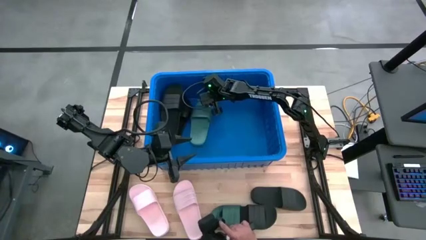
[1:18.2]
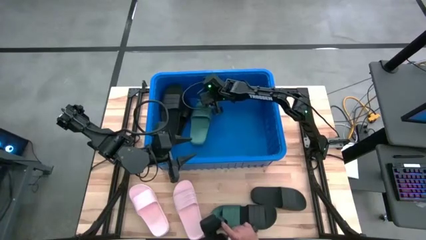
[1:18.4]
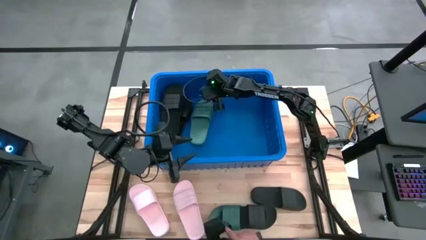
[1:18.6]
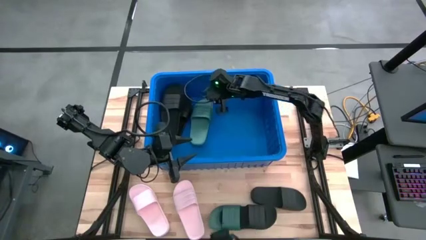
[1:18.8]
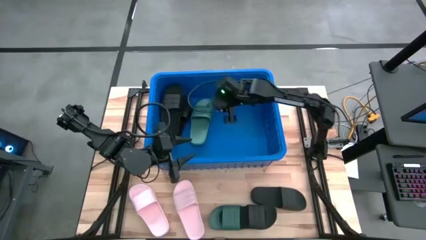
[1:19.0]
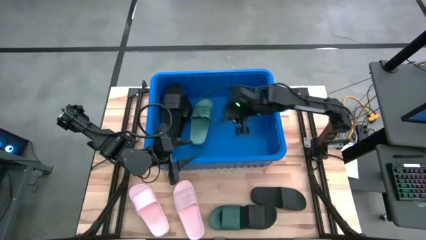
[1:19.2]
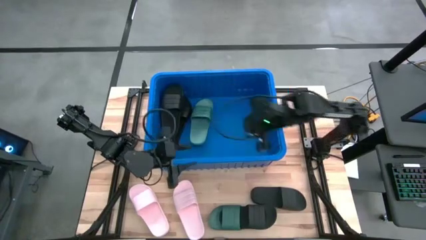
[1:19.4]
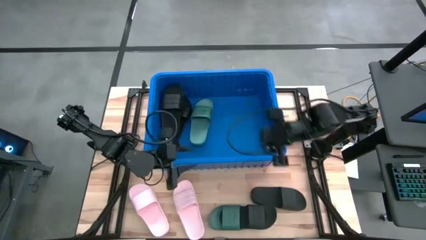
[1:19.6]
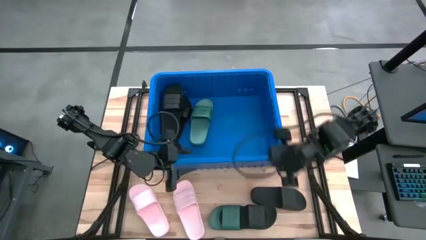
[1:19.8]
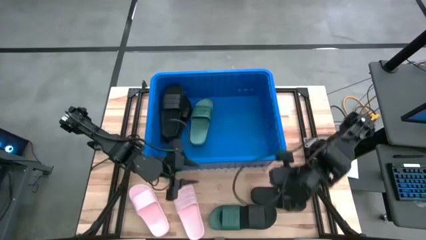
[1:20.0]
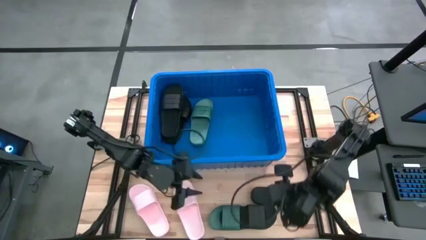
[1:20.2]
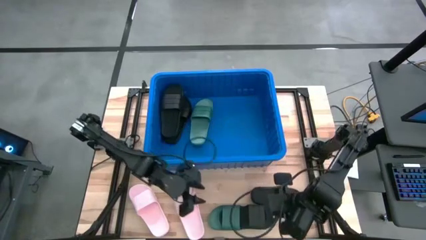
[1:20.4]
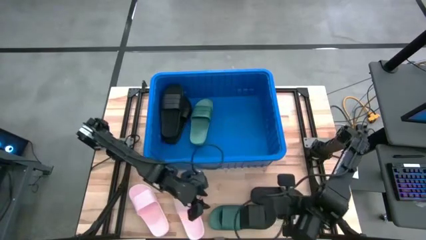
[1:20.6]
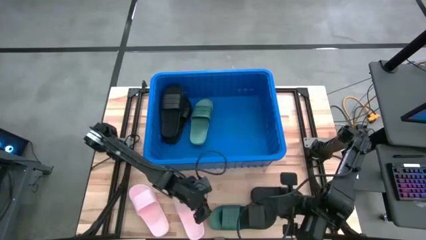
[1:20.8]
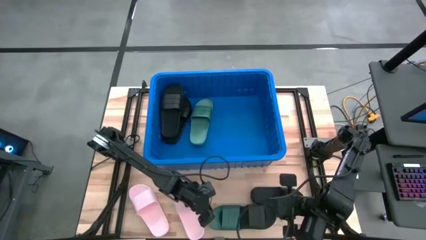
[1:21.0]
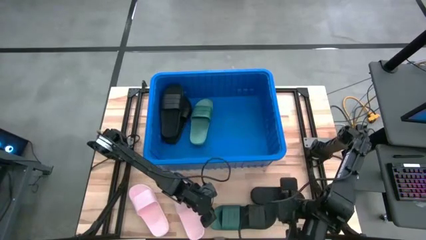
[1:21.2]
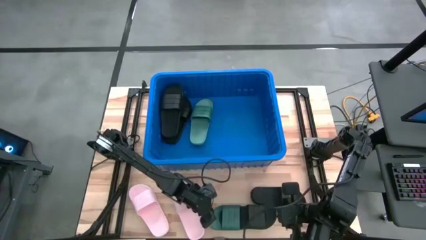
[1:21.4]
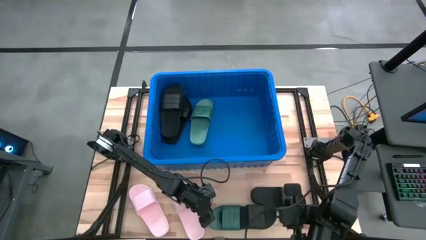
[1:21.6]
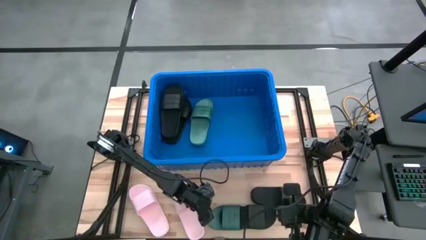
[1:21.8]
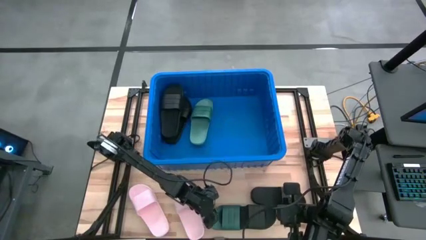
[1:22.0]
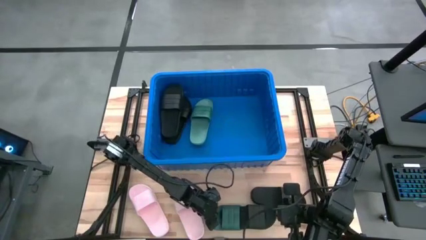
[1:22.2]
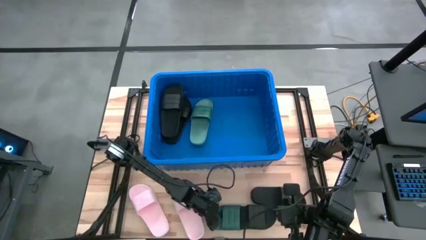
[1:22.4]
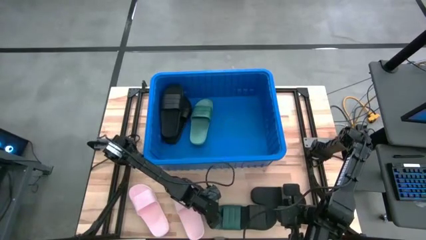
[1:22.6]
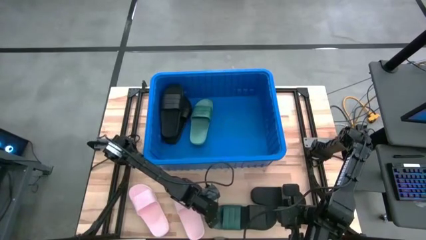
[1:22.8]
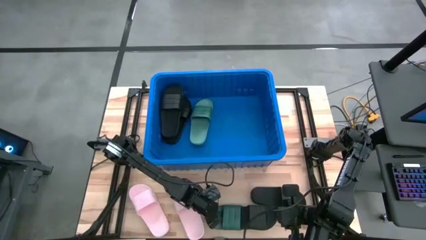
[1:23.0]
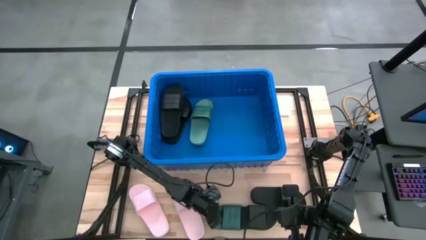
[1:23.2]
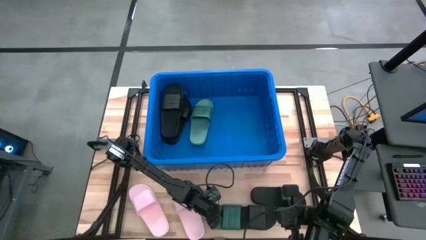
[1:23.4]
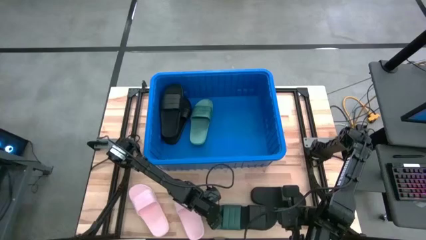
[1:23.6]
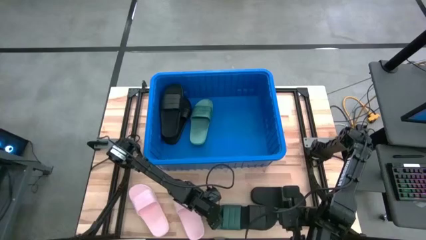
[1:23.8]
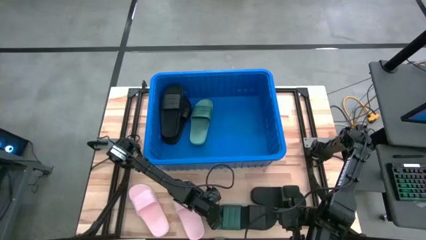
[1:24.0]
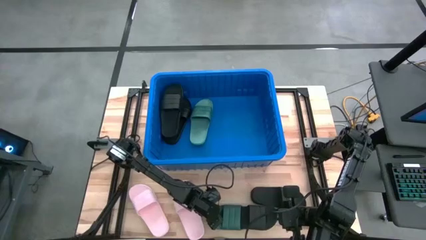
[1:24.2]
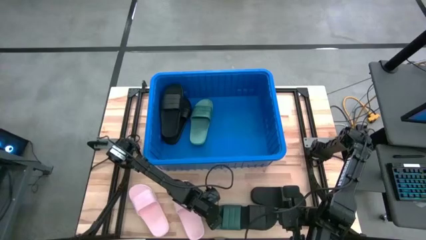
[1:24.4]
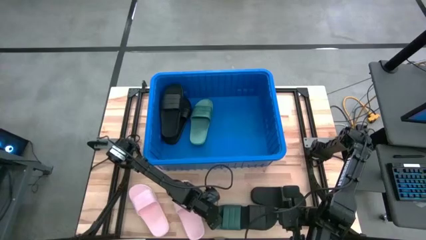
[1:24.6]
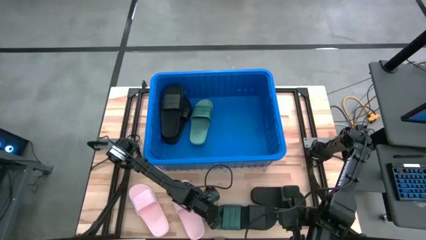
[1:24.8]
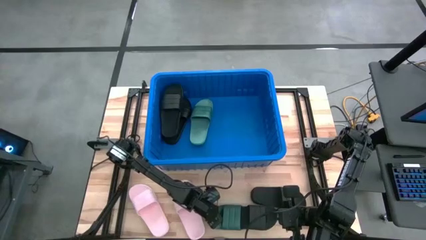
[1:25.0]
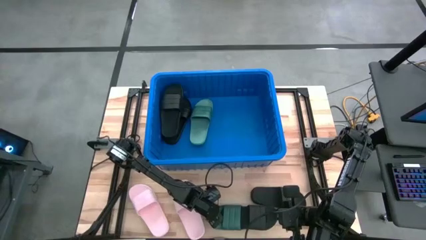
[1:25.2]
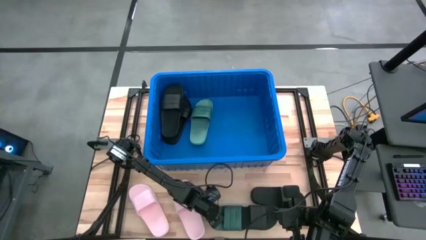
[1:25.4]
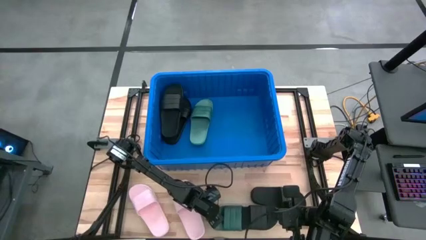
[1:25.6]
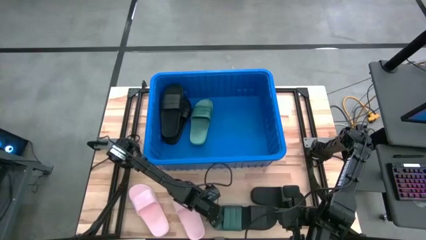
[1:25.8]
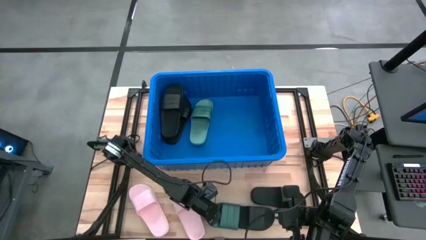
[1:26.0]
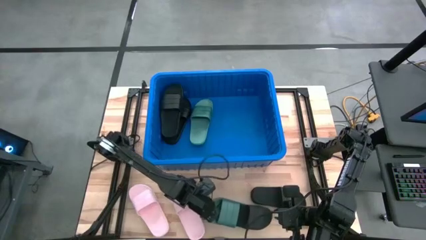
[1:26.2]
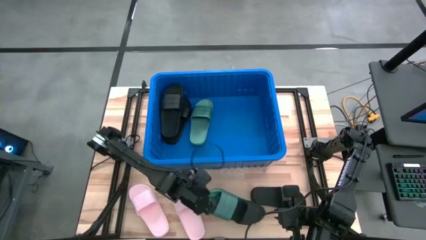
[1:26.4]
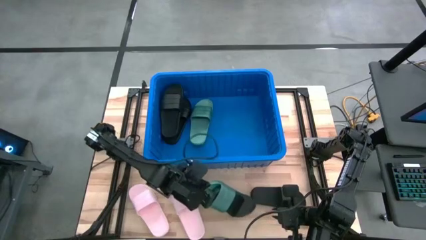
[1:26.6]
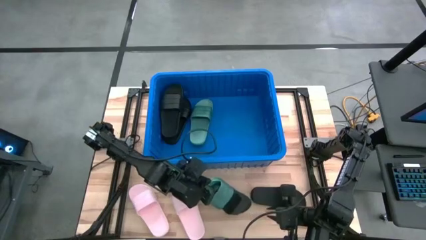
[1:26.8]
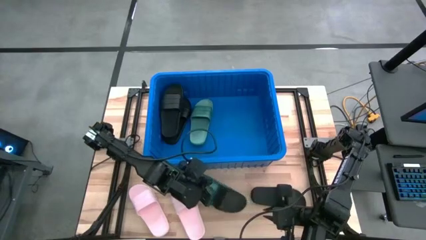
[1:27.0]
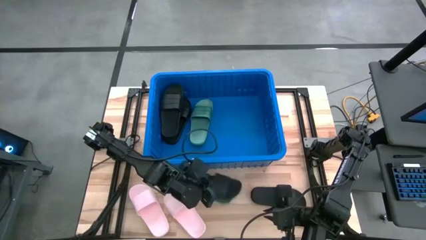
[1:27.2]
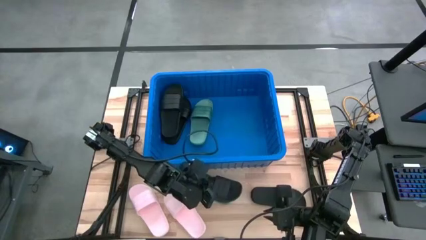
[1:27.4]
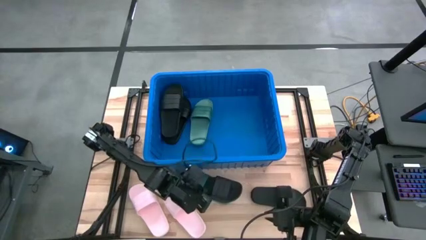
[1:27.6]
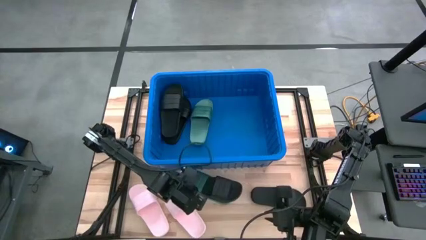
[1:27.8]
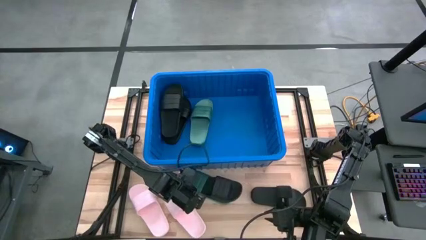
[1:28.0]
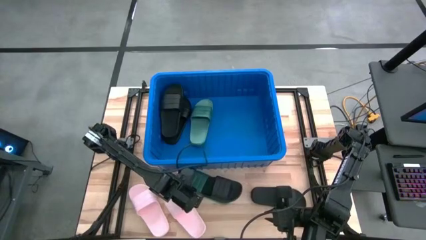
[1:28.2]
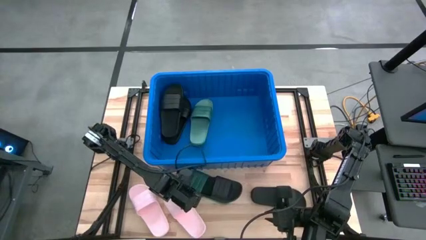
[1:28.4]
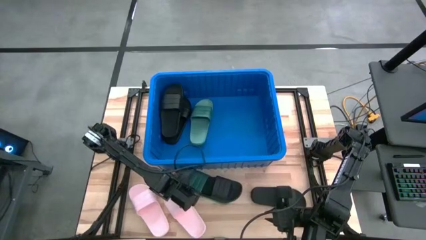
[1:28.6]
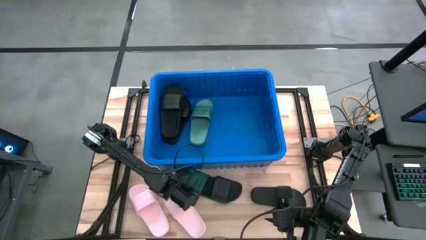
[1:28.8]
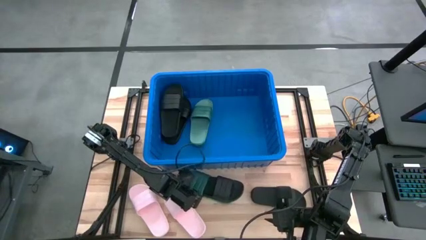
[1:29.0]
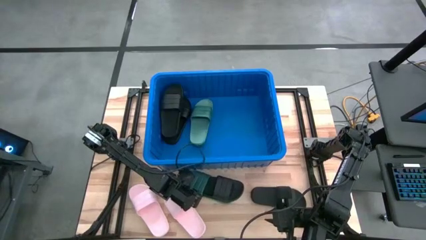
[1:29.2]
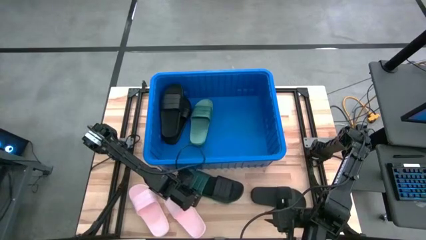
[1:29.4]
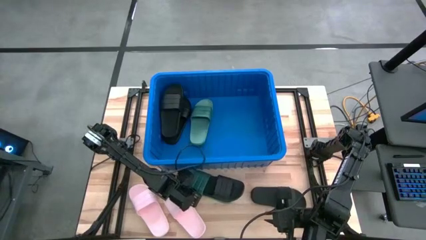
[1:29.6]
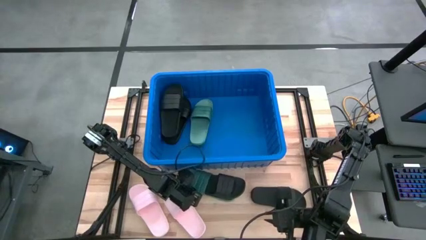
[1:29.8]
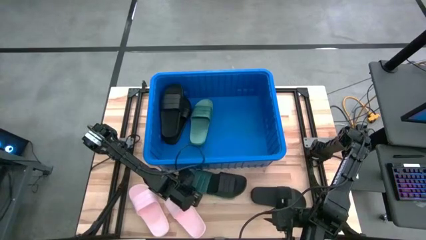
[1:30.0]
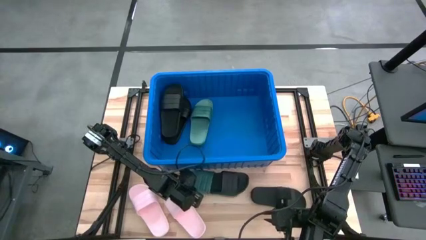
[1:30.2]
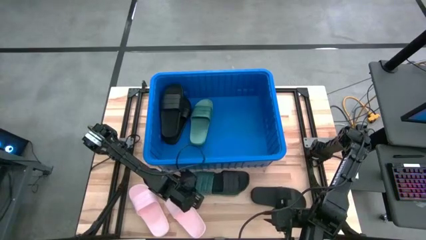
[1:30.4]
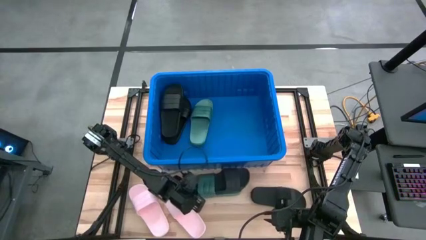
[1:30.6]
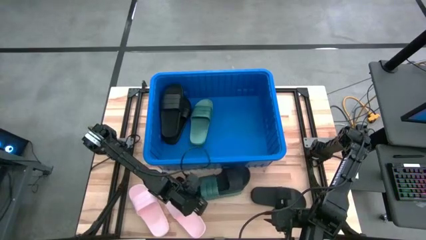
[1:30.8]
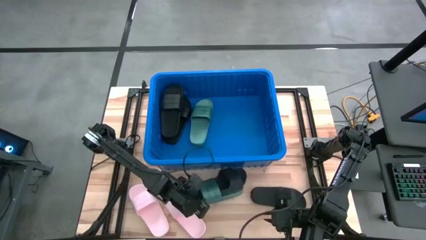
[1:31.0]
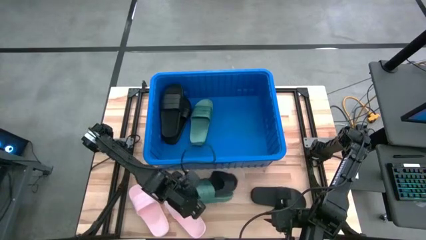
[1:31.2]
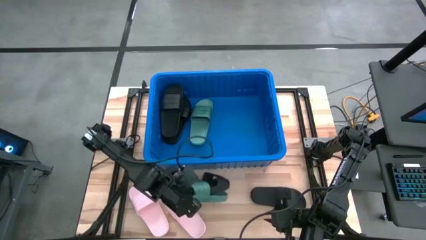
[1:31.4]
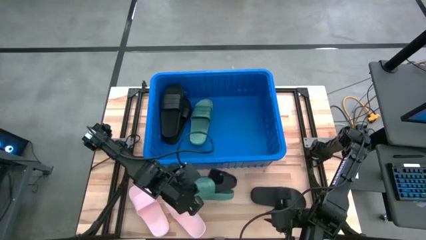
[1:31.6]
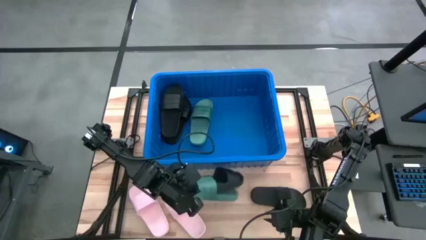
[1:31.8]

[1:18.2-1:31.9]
Task: Pick and place slides into bin
Put the green slipper on the green slipper

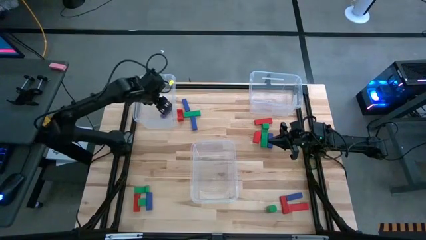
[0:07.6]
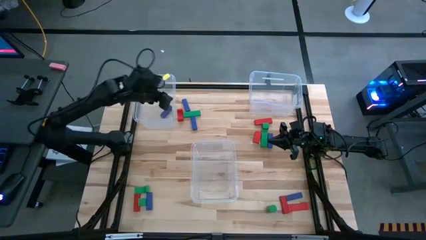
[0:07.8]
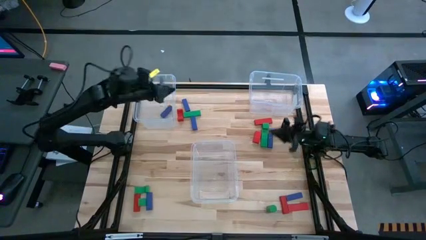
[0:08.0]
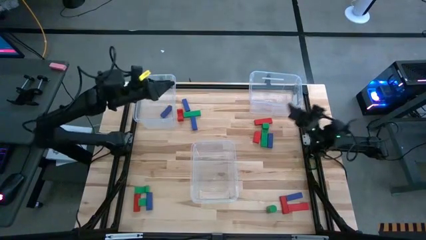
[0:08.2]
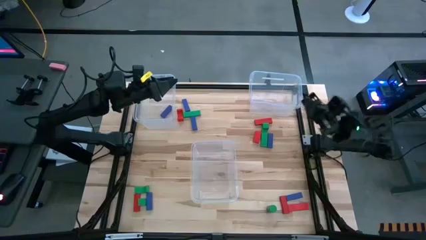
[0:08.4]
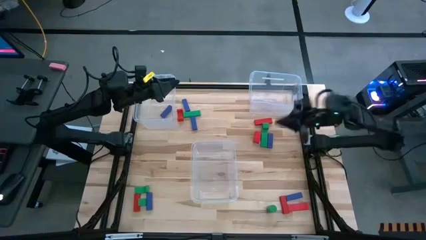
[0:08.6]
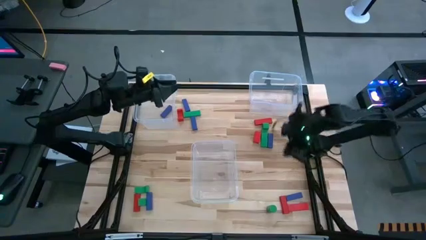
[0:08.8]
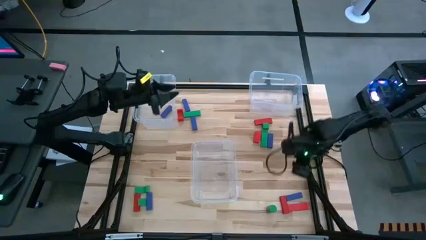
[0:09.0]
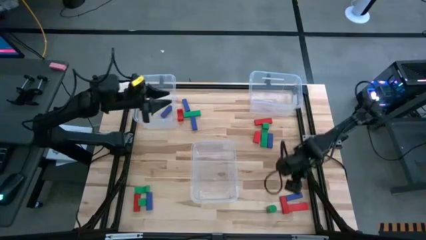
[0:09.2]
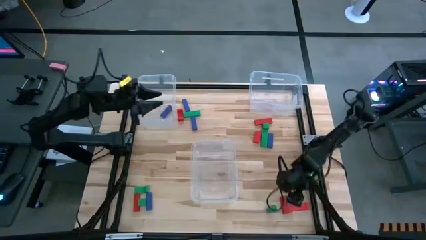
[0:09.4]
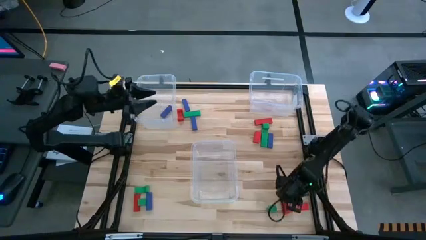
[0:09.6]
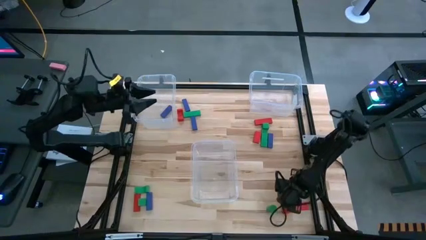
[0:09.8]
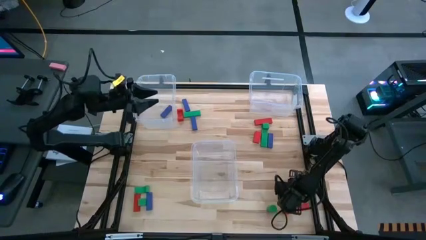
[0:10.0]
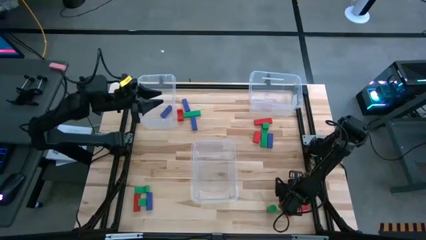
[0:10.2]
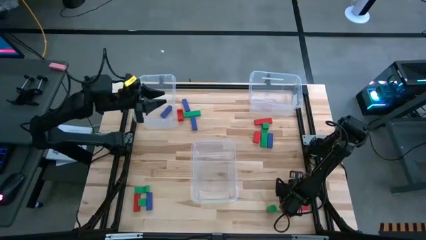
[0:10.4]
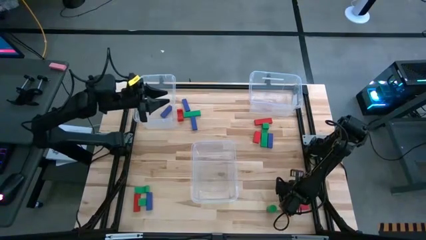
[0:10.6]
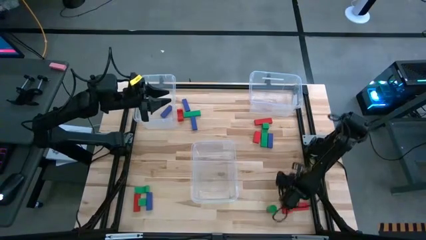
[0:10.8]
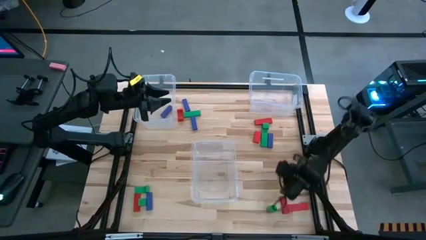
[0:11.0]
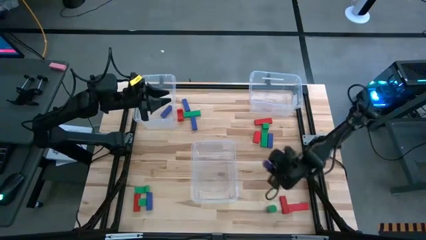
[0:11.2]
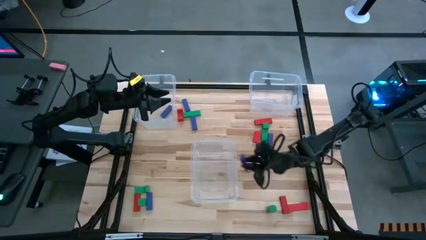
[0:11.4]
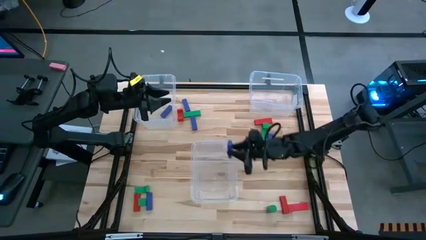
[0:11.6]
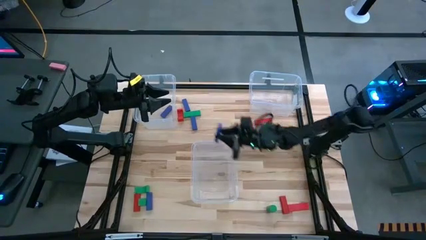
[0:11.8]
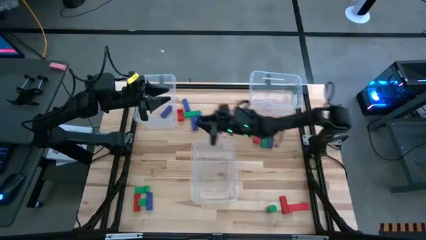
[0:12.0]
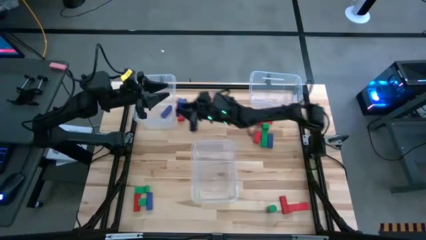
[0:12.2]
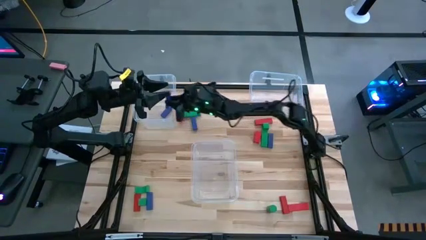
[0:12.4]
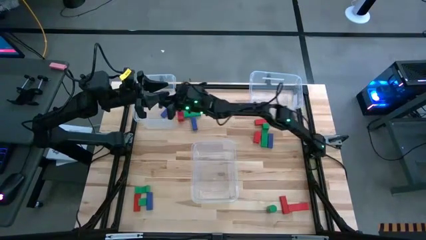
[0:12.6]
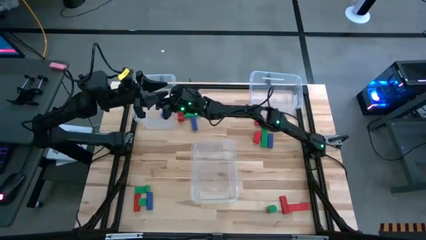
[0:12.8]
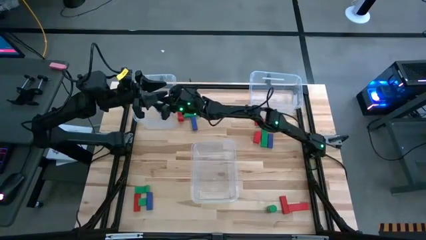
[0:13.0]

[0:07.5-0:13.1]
Task: Sort blocks
Put the blue block into the top left transparent bin
